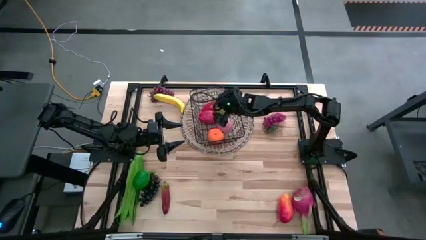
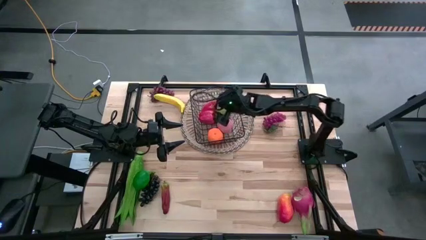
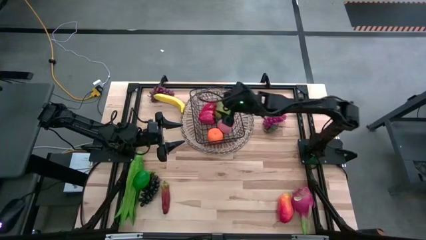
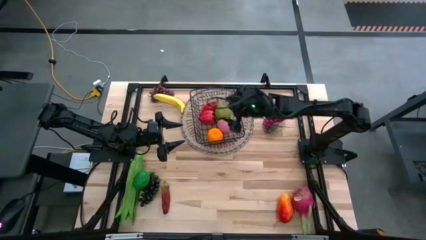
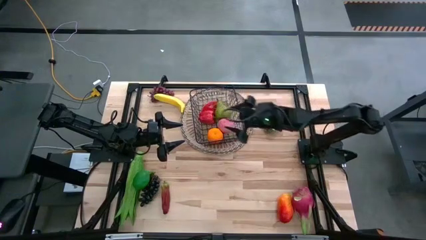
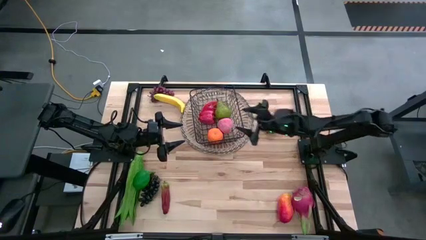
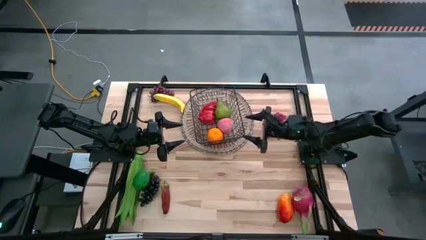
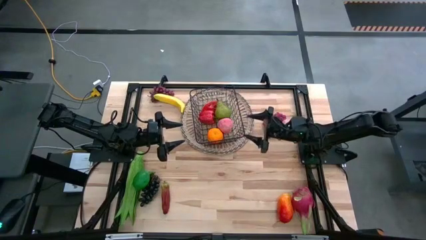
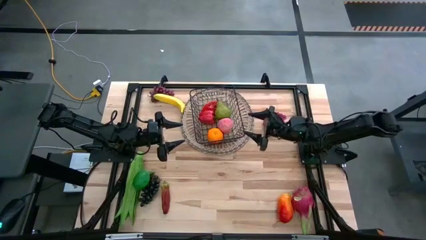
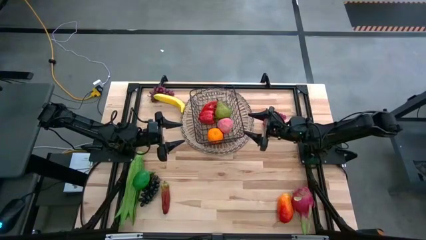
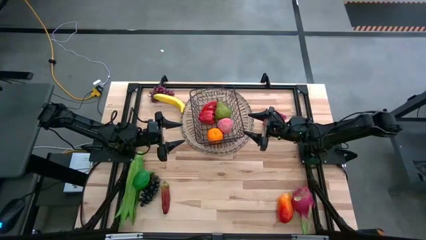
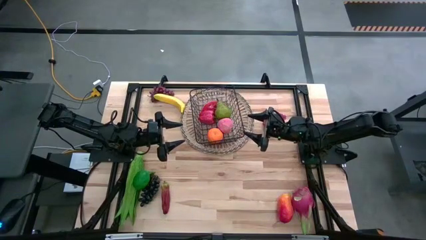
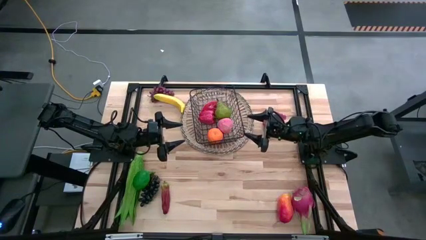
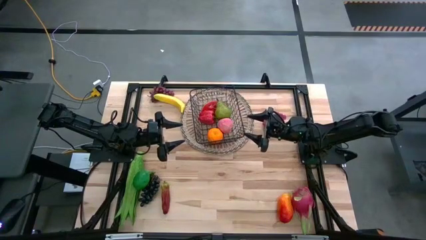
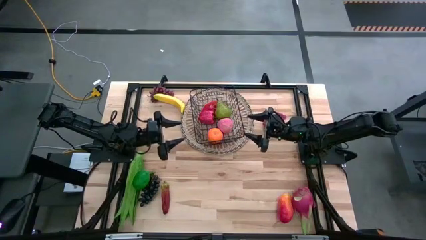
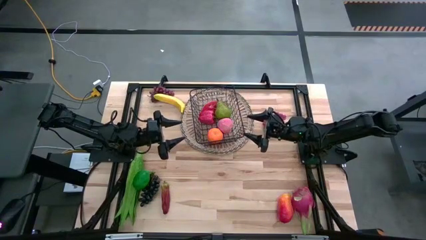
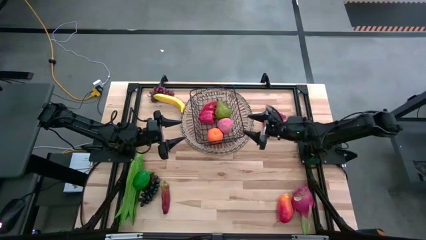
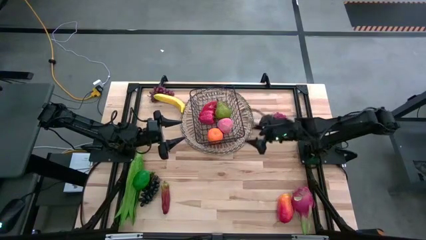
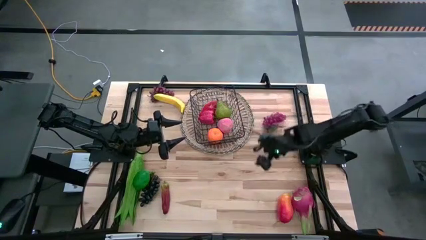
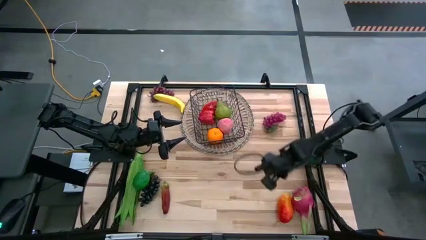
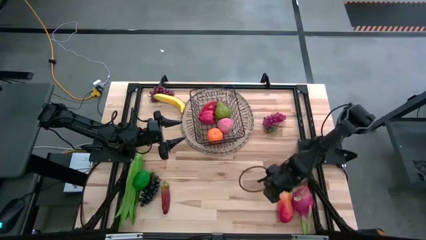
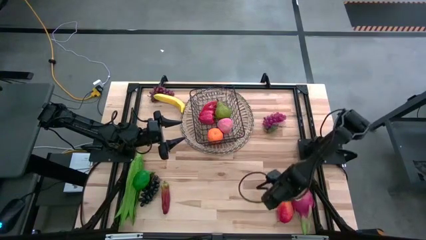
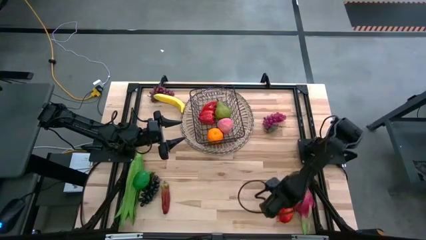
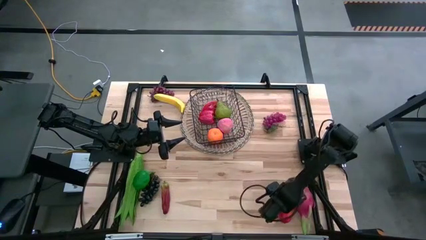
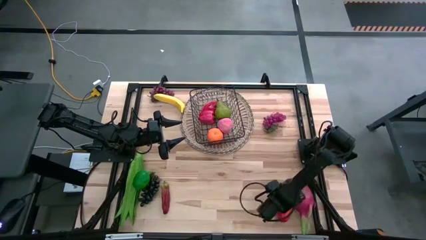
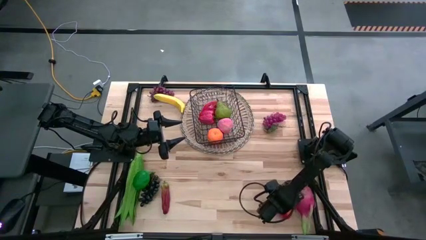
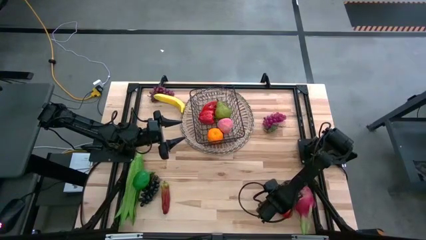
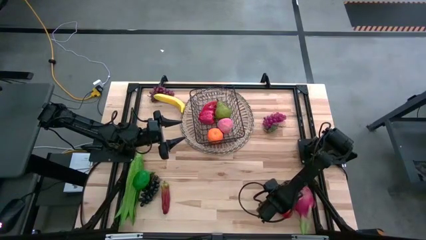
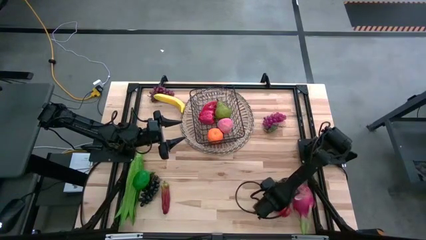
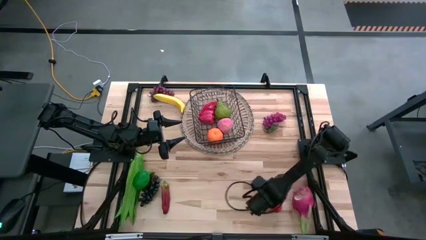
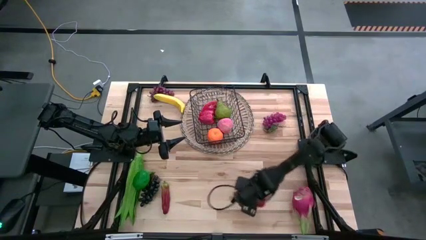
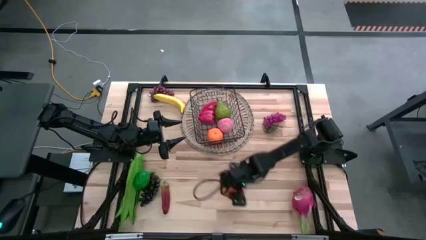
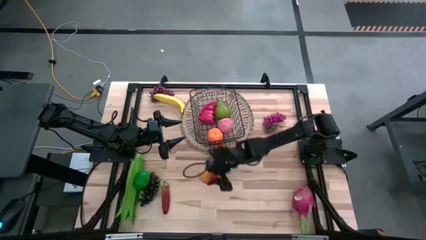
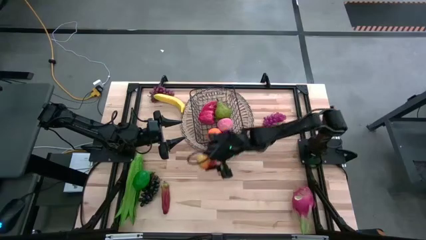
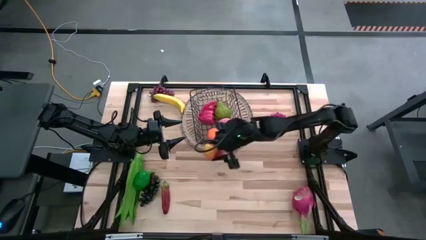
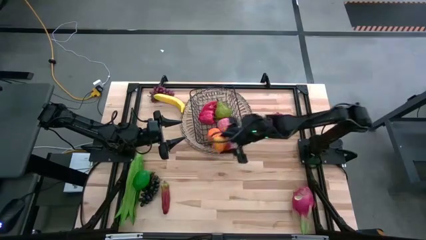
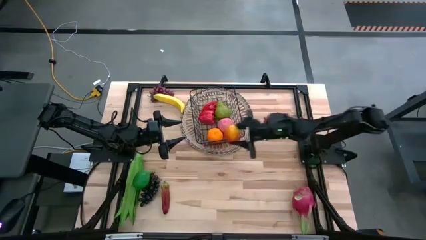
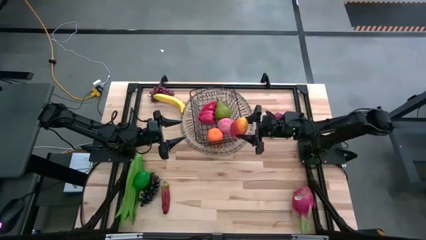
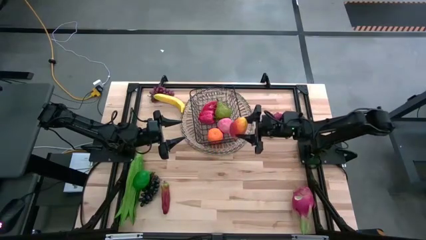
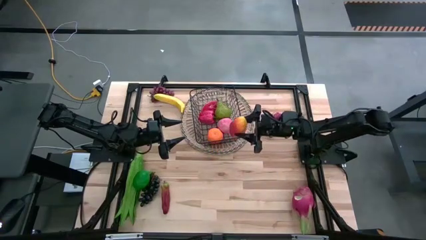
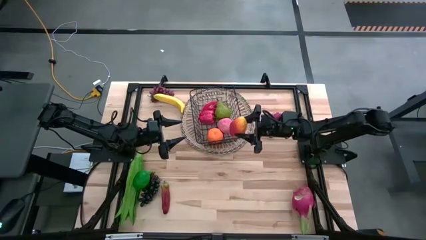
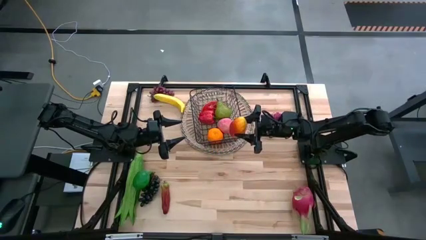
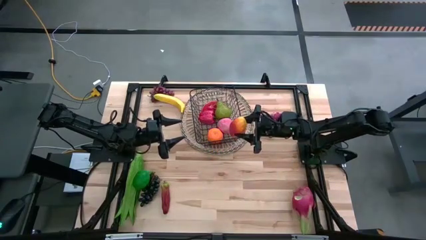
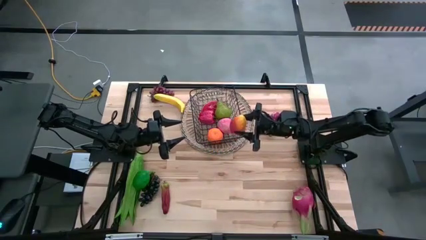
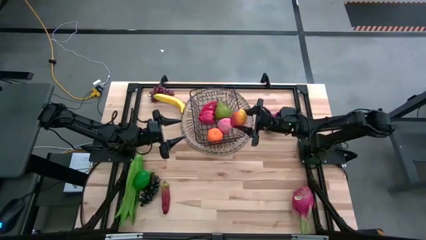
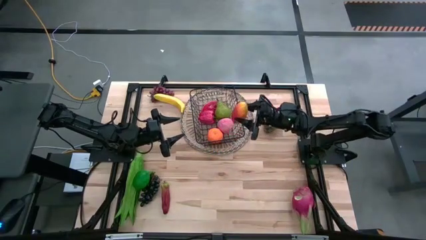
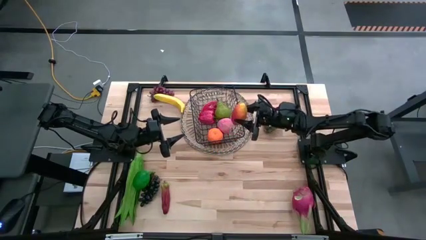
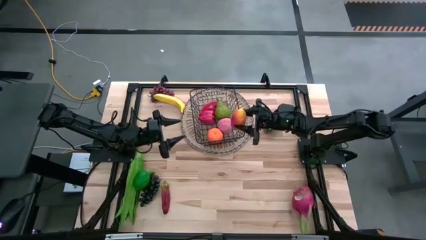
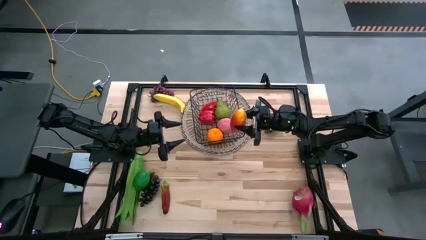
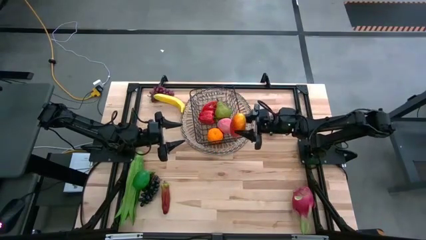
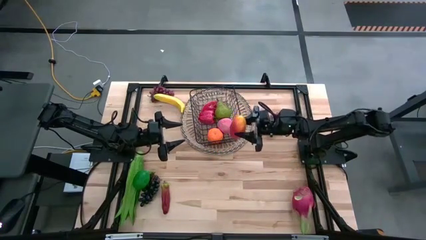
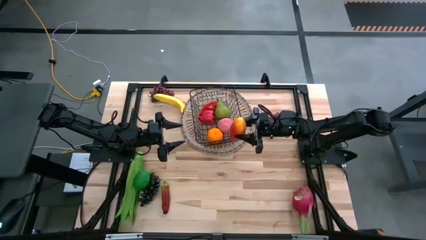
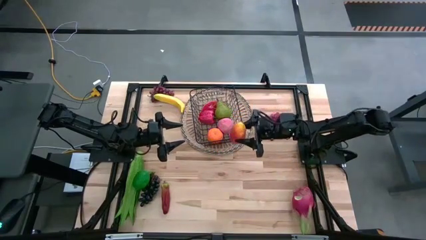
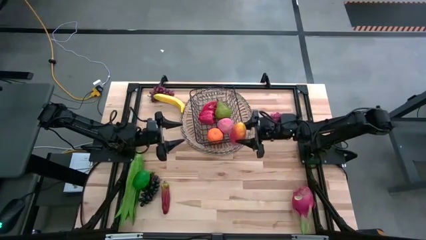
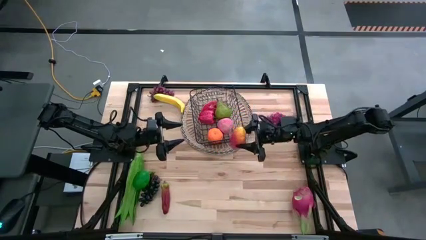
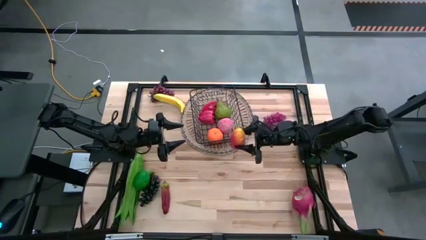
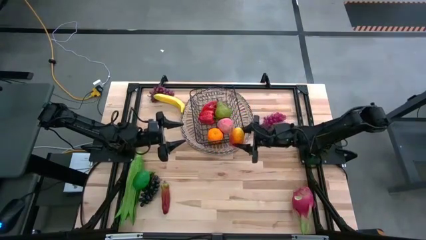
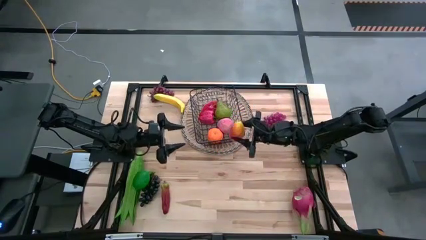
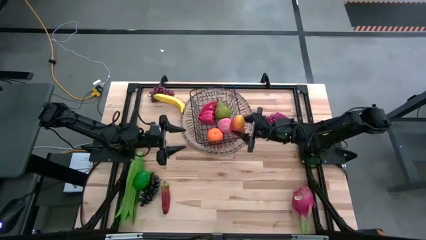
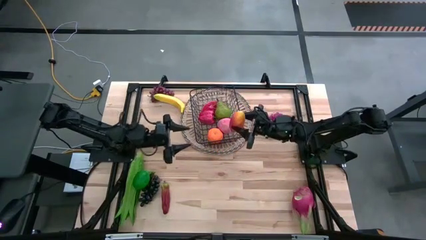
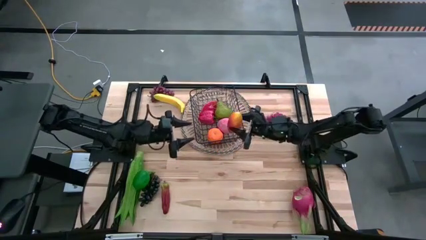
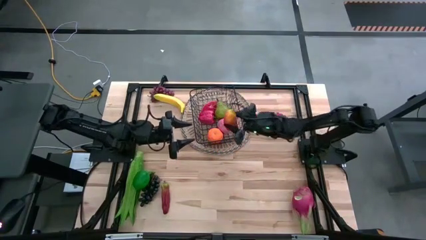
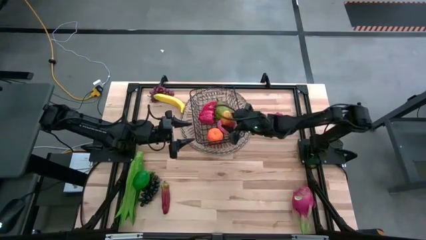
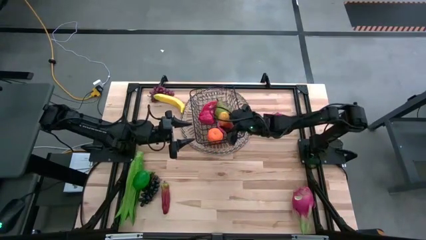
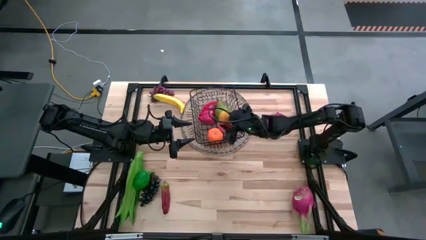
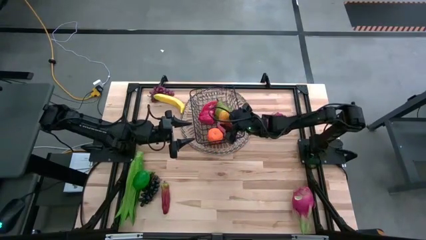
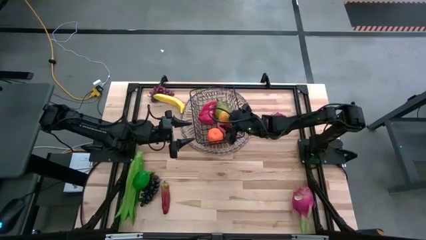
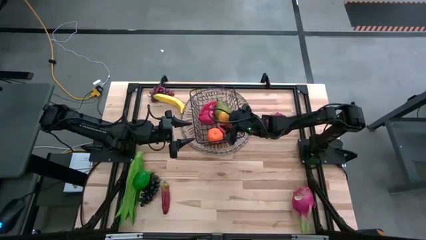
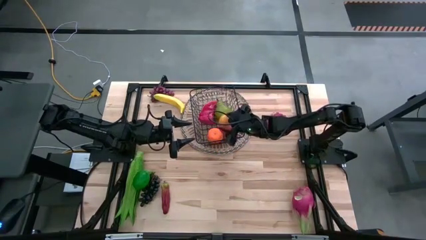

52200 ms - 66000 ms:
Task: Build produce basket
Put the yellow mango into the black wire basket
